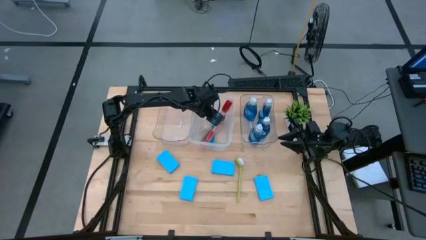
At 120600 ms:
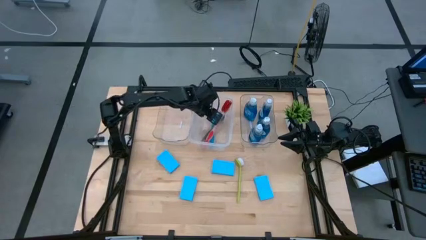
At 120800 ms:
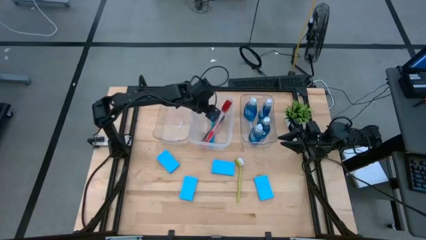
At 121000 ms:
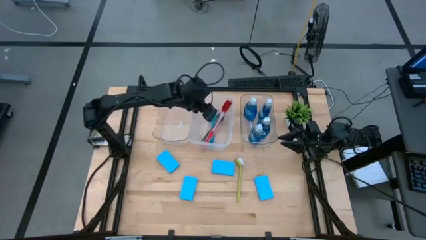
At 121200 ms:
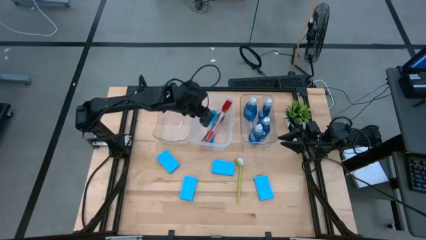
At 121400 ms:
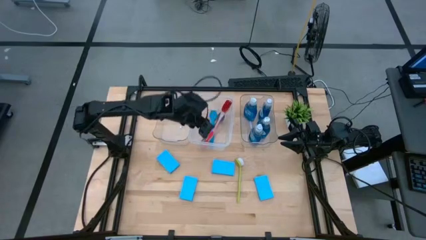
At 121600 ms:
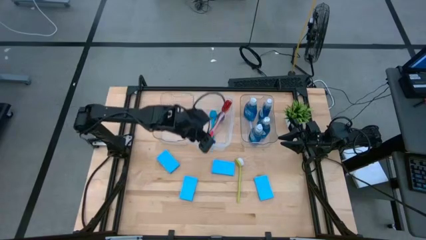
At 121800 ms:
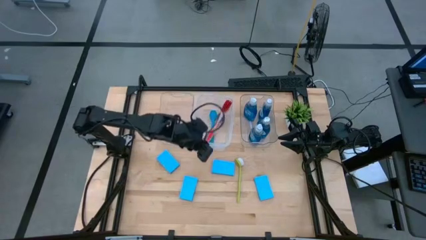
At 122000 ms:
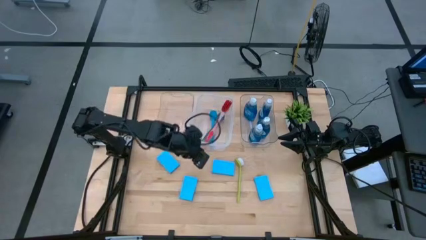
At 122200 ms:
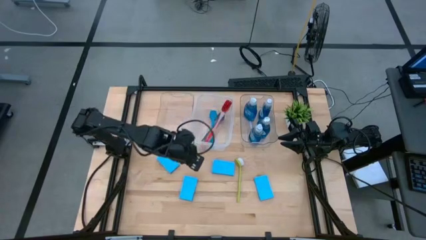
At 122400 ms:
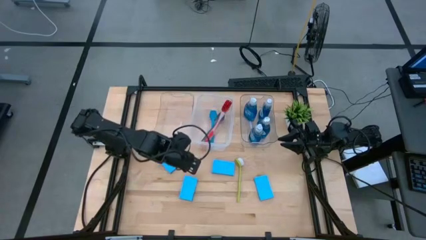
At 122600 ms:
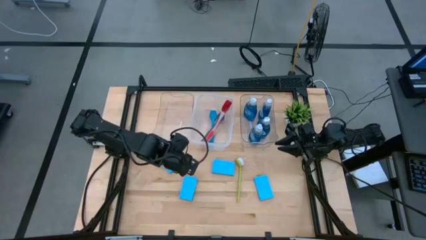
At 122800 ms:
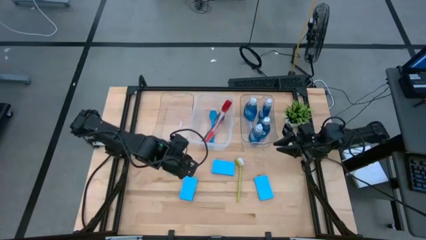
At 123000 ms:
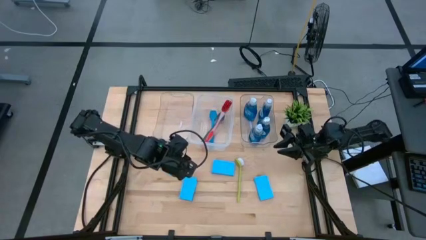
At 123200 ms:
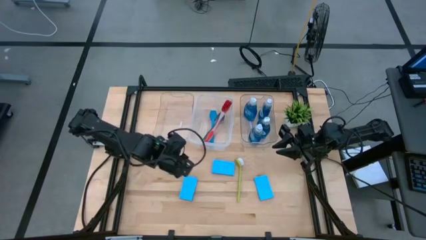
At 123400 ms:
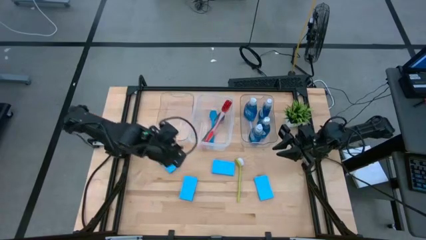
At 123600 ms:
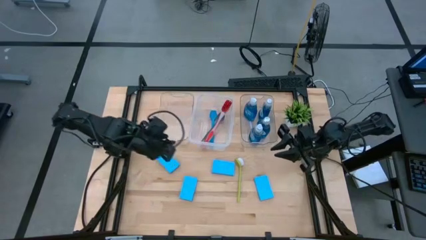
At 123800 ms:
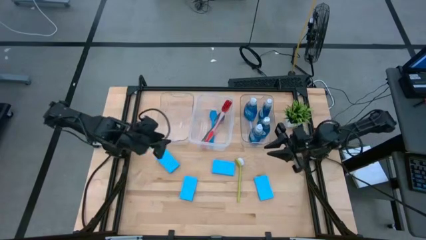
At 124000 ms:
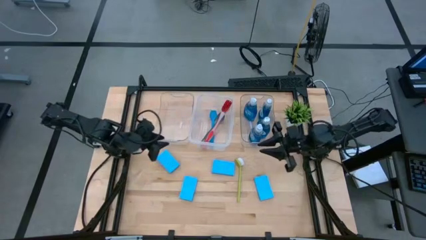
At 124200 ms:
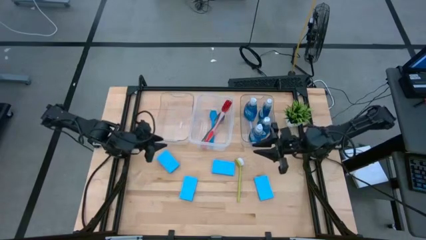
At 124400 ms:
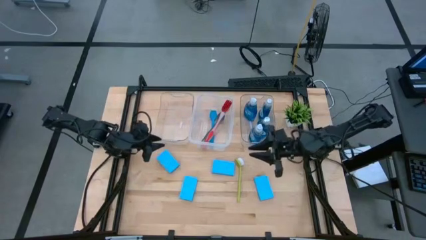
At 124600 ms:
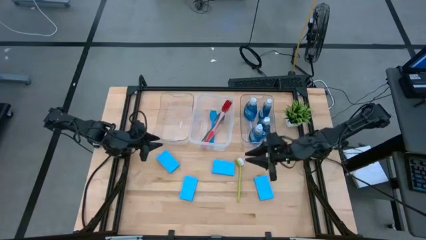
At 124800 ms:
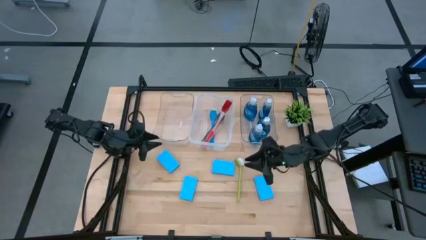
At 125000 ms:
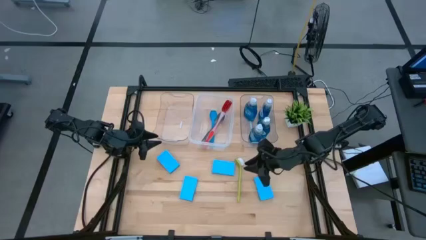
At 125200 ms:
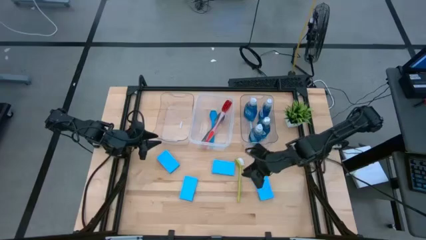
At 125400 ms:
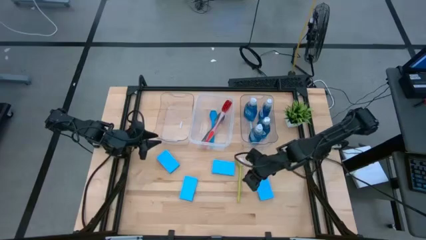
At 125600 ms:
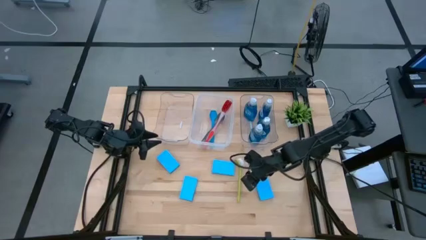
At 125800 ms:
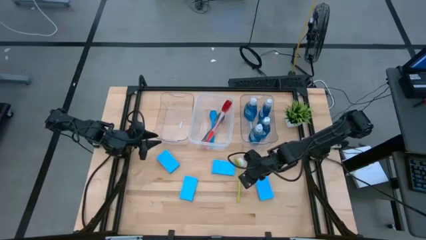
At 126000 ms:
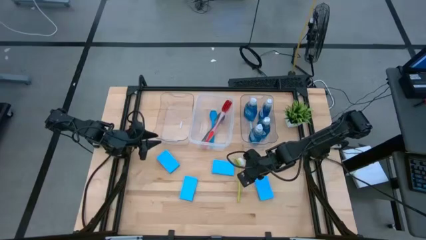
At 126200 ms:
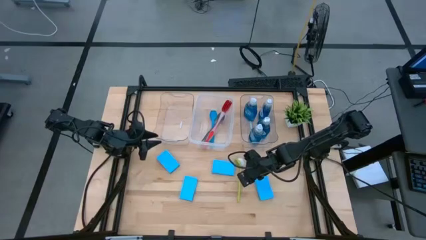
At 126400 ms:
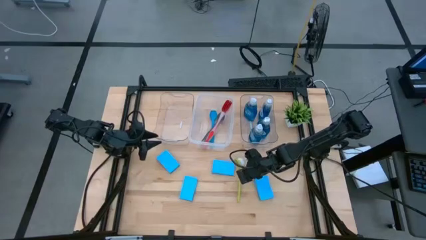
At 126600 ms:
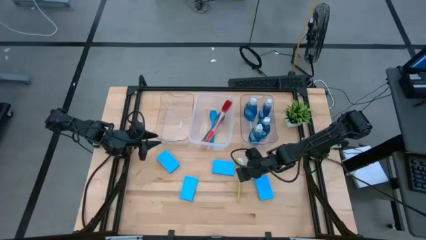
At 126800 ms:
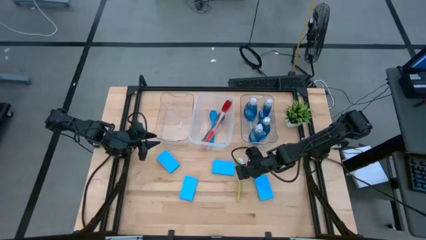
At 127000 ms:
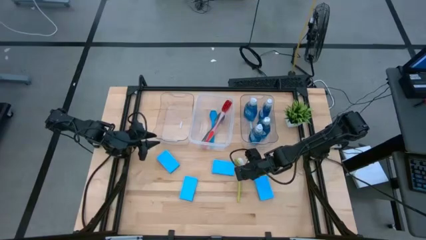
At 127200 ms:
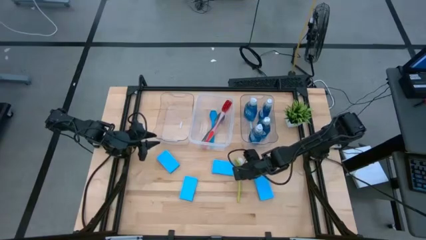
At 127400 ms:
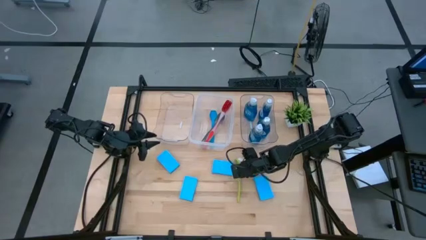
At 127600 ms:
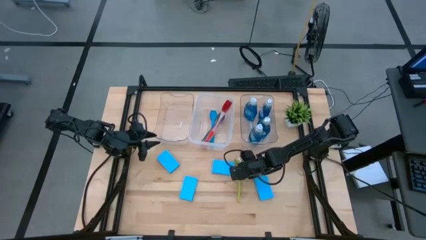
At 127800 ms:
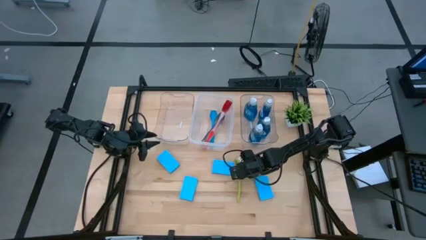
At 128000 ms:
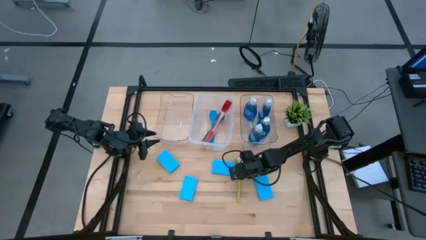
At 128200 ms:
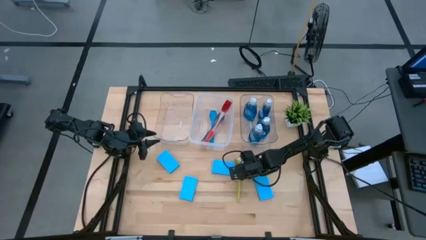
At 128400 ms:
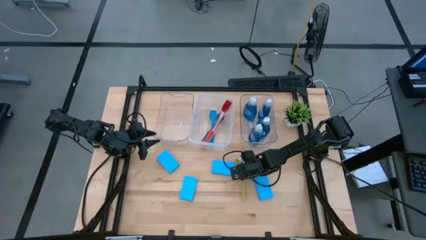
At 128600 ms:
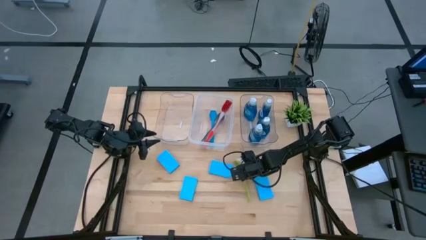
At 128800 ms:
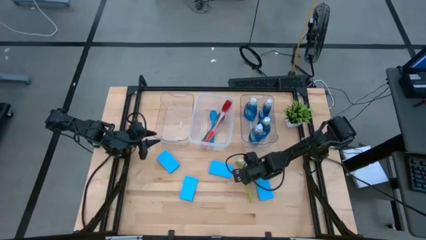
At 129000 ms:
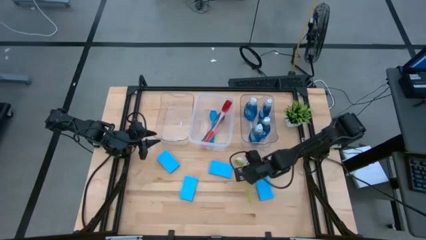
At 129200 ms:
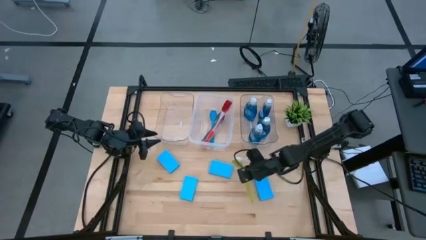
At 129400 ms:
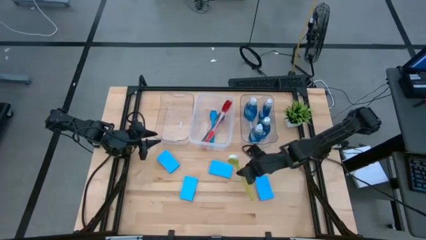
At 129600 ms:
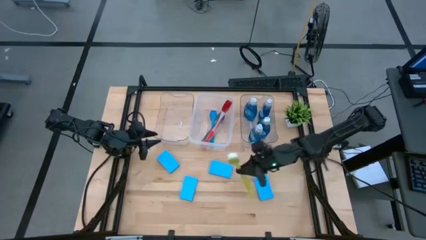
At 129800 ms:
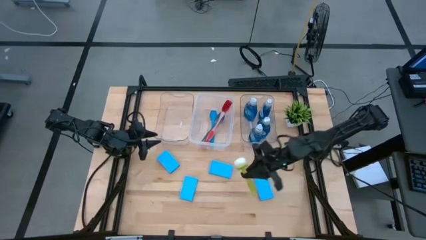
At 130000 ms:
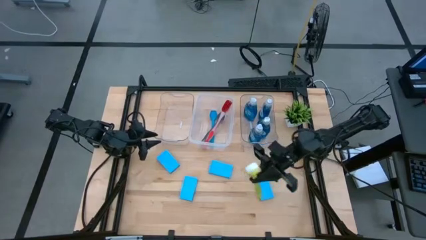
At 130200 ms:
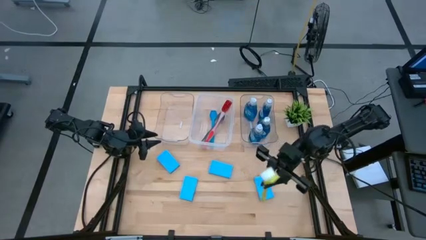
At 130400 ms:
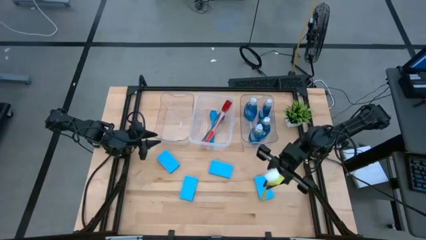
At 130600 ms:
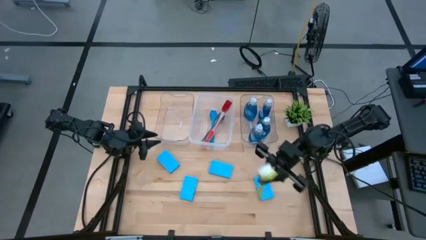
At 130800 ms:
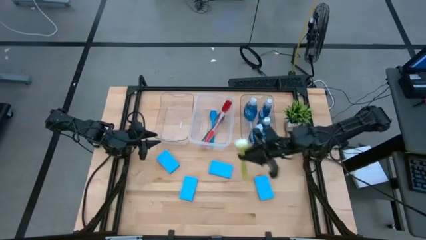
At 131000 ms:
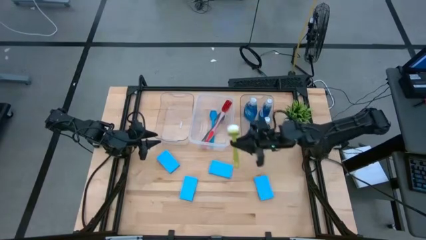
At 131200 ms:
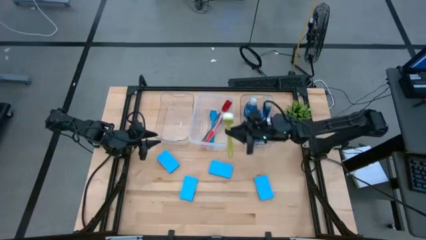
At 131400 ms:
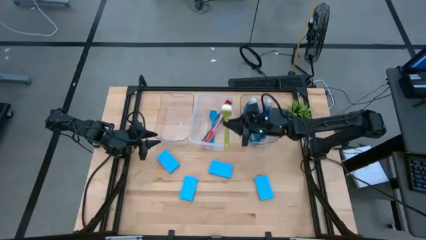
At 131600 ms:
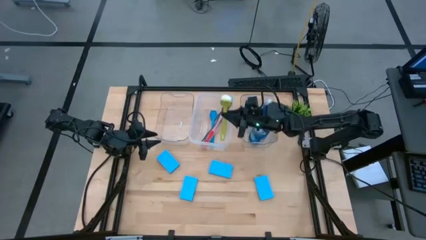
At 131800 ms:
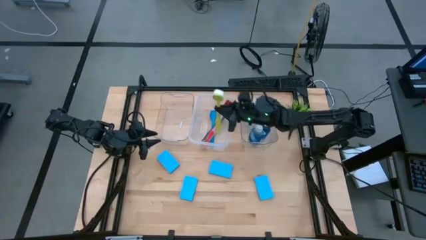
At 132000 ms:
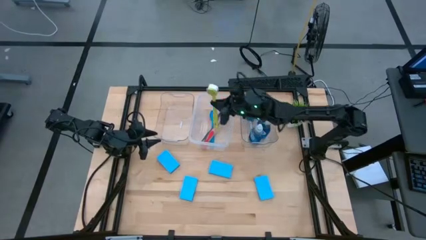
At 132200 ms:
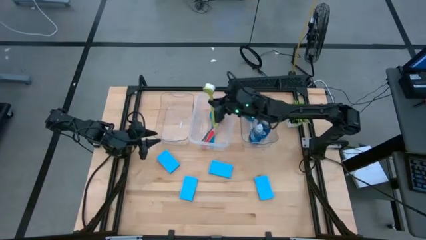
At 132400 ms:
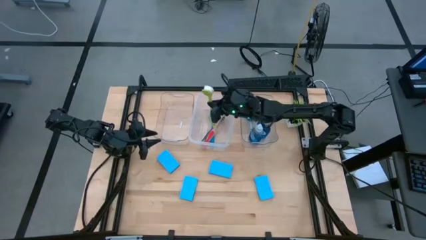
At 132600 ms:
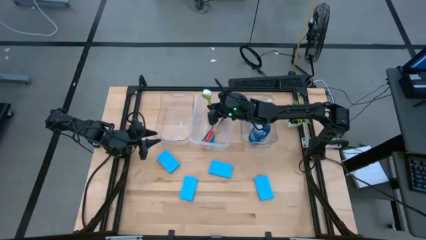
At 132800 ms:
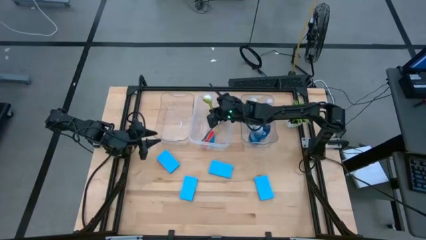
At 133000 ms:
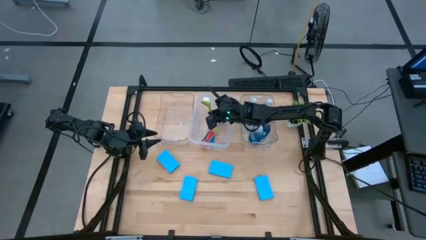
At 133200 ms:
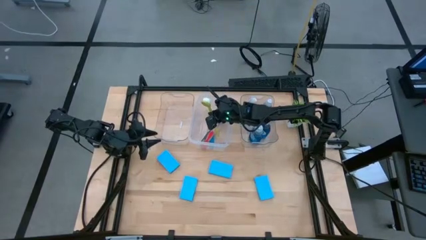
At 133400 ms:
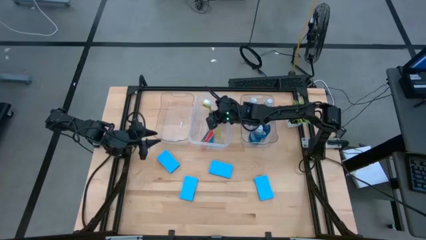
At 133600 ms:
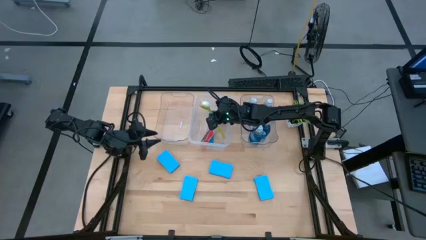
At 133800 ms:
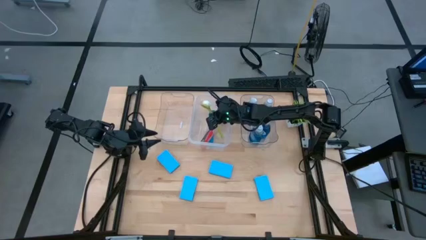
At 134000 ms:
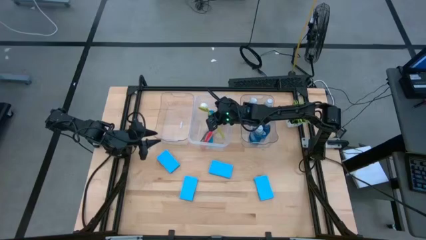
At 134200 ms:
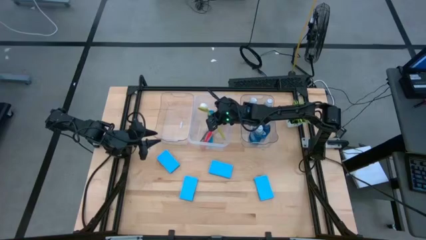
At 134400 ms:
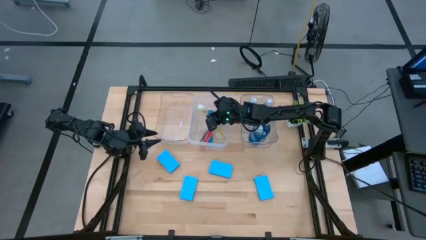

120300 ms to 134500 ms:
Task: Pick & Place Kitchen Sink Supplies
Put the light green toilet brush into the middle transparent bin
